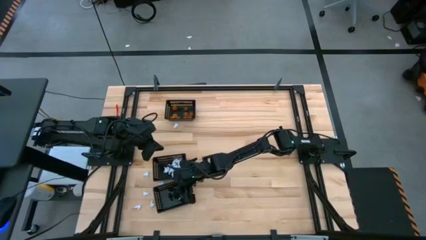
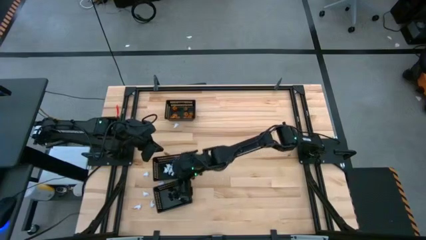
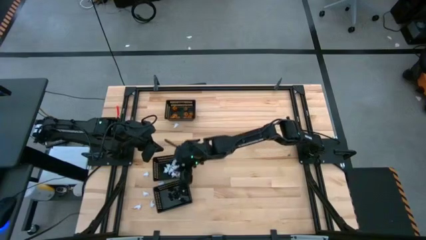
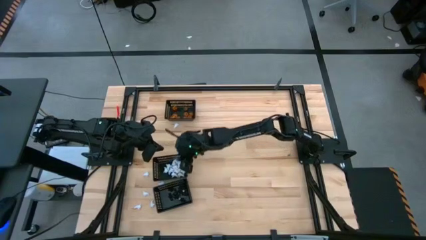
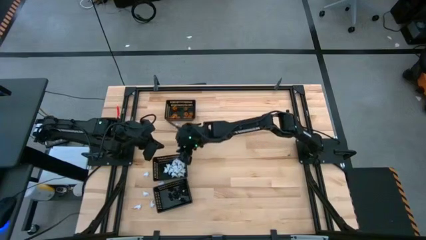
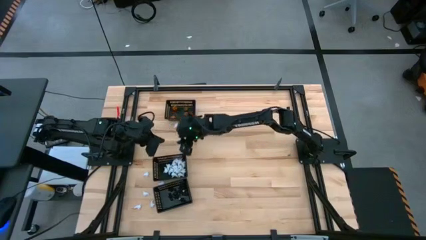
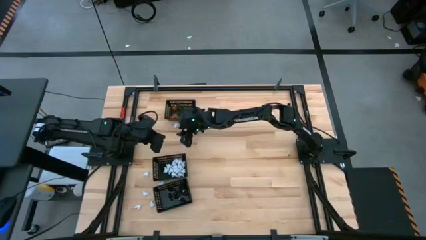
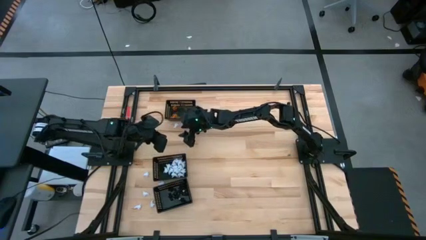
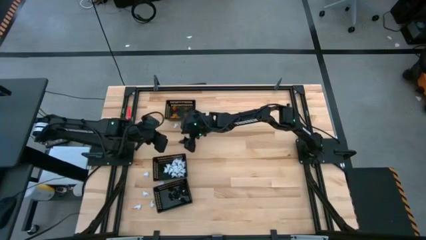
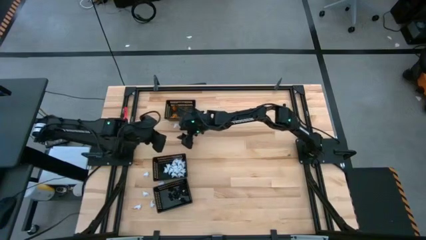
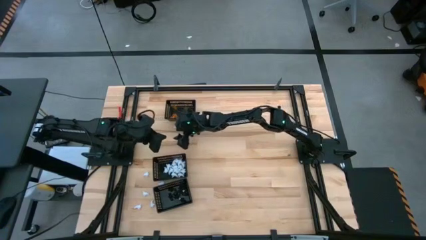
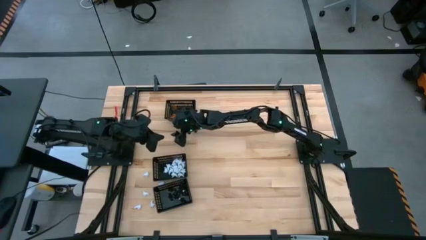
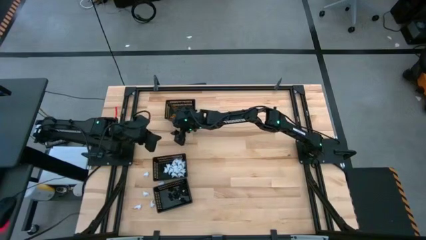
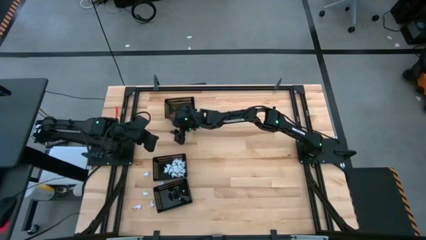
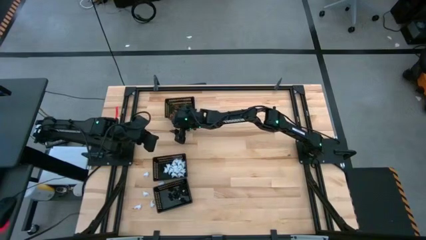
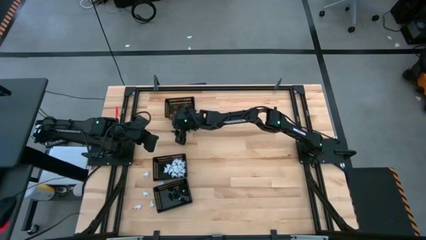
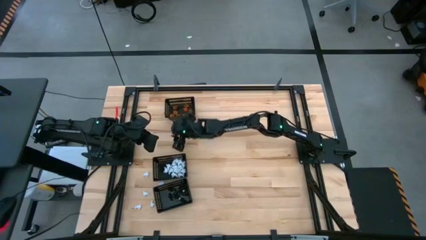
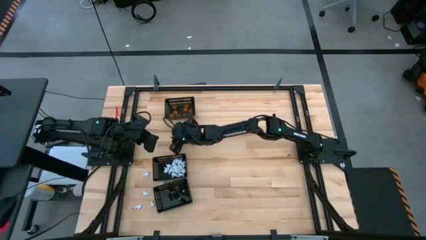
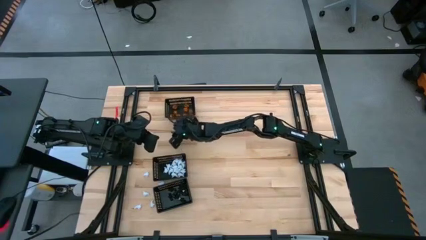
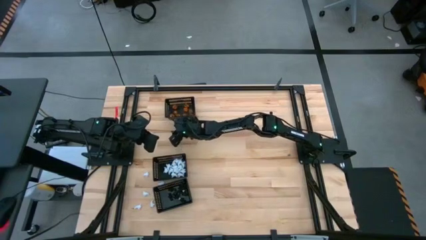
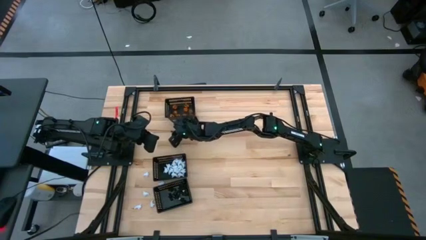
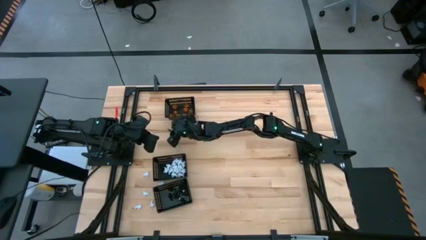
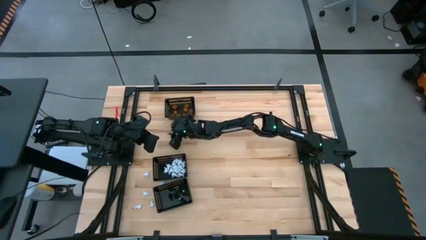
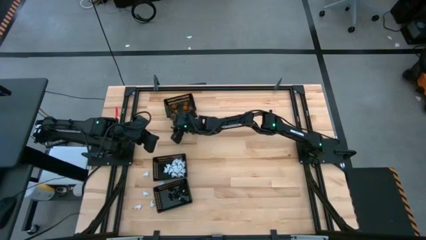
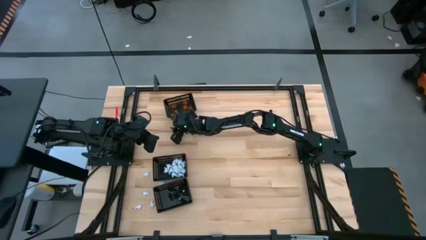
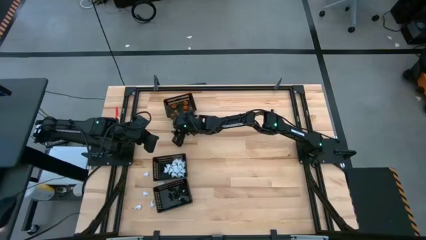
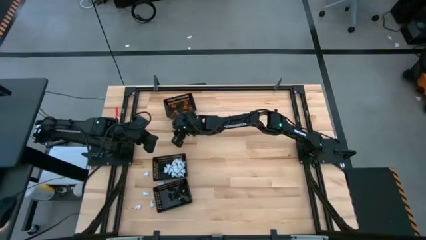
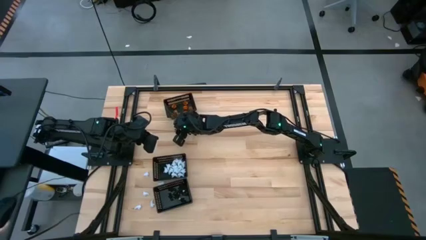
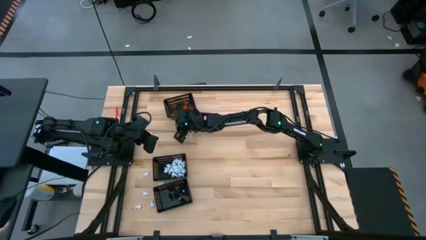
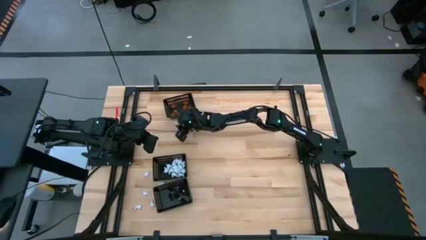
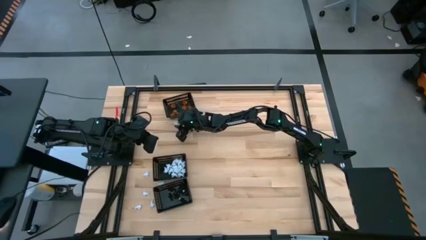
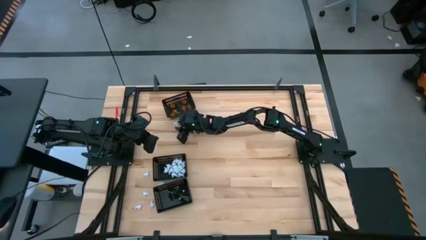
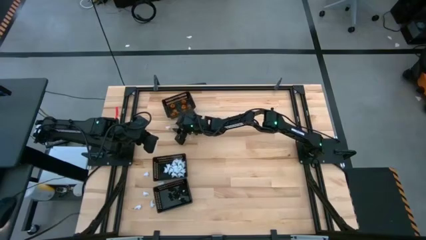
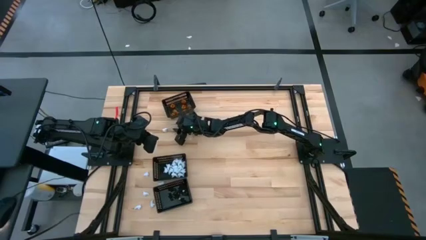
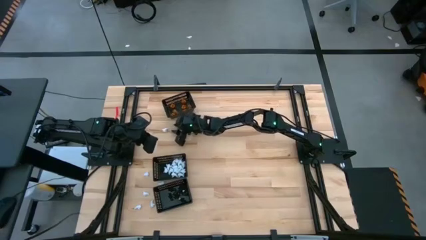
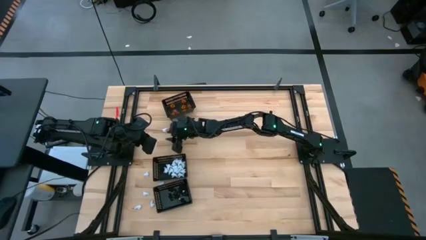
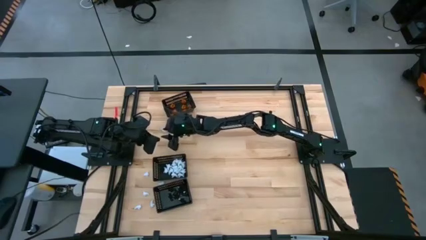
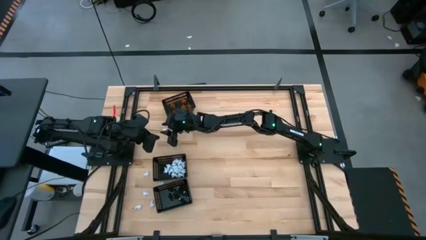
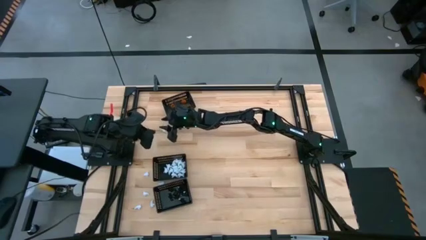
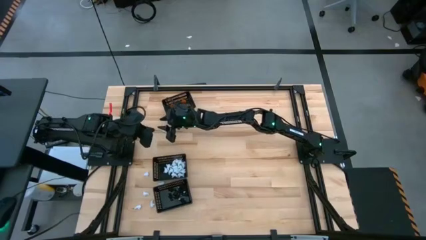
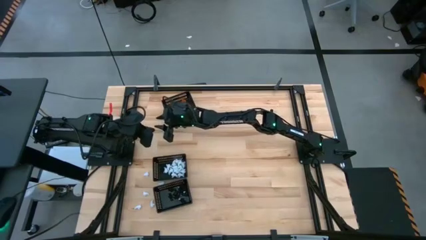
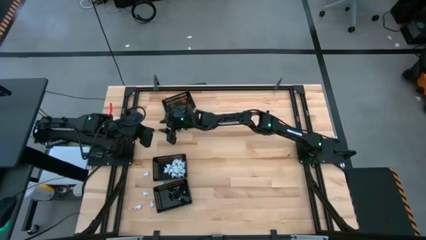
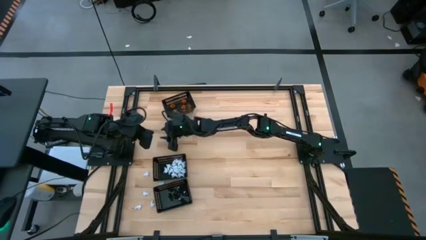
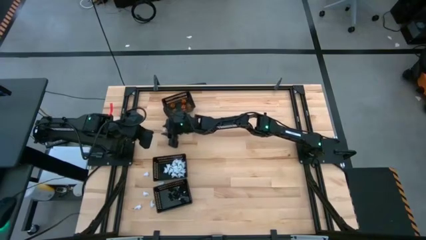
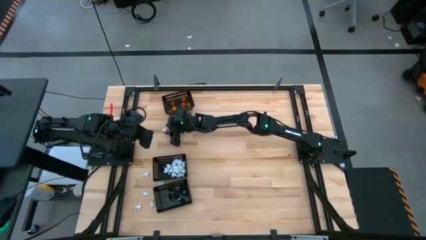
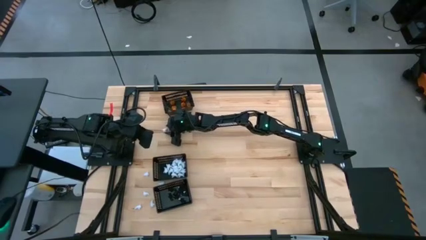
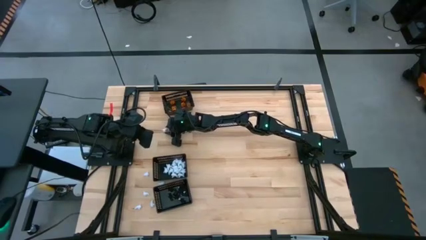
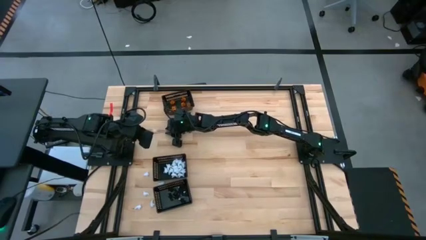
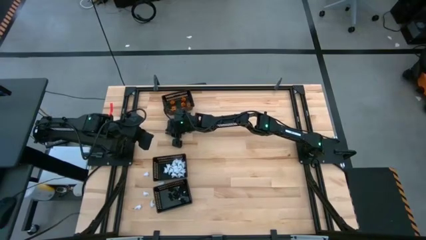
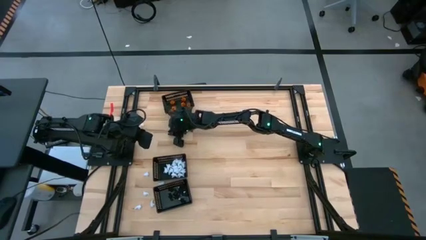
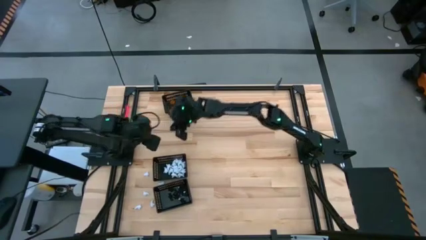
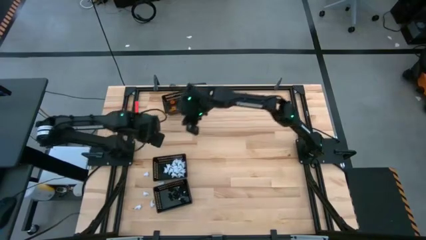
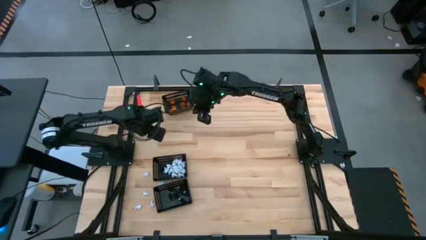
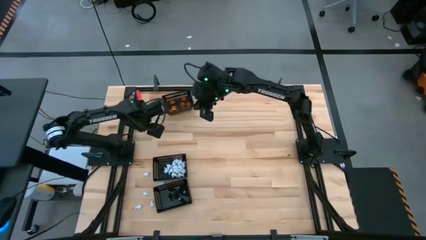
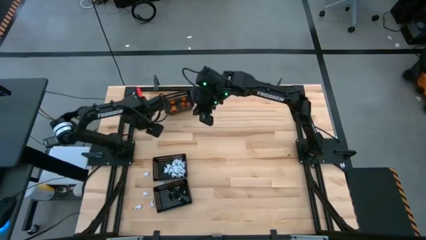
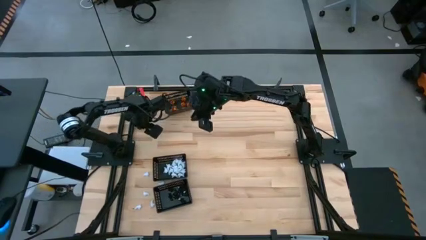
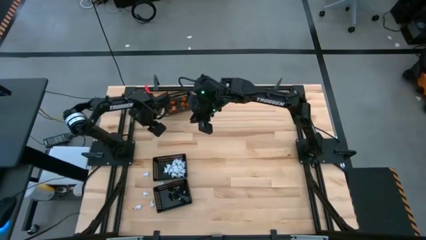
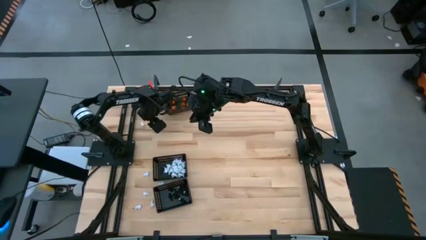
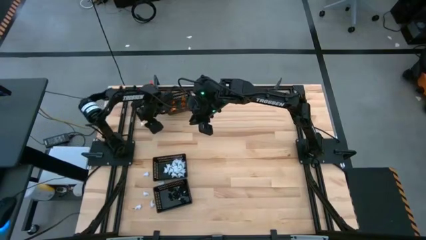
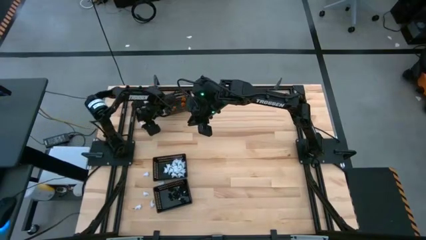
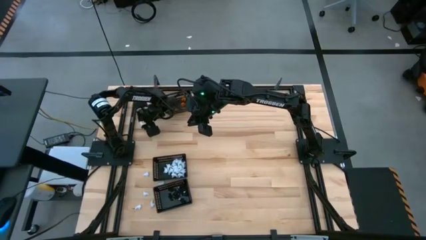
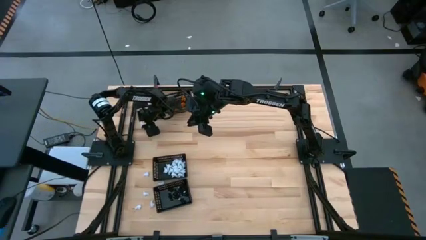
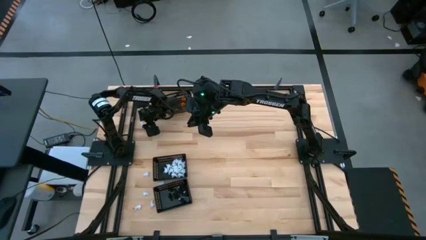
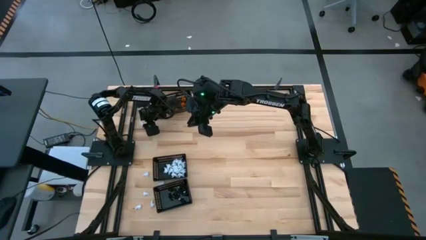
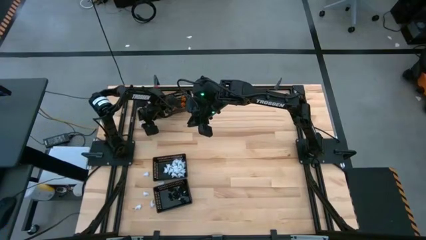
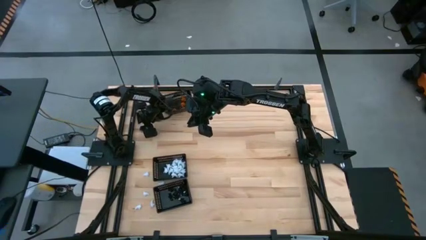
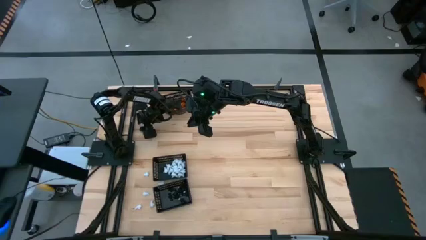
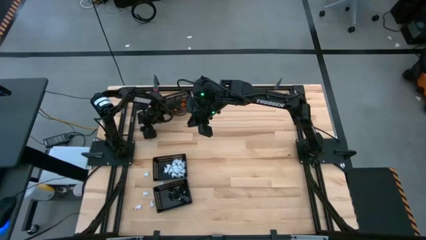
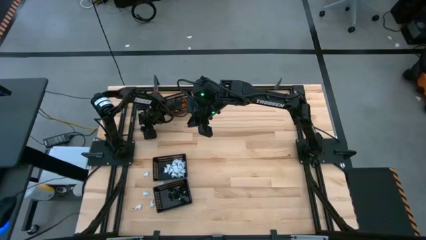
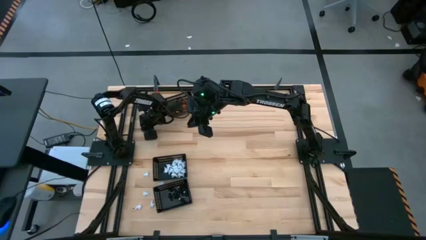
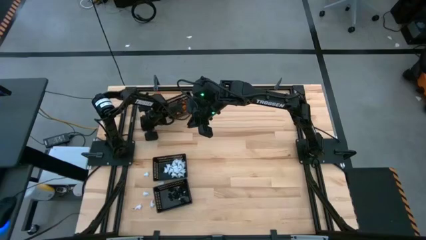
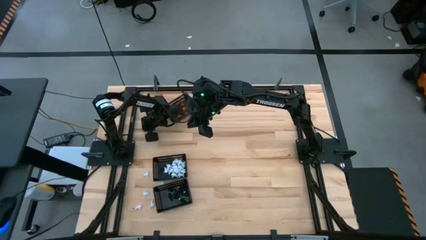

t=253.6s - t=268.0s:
Task: Sort Halloween decoration
Put the white toy into the middle black bin
